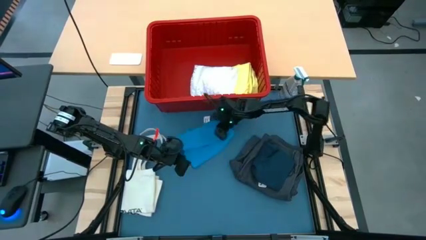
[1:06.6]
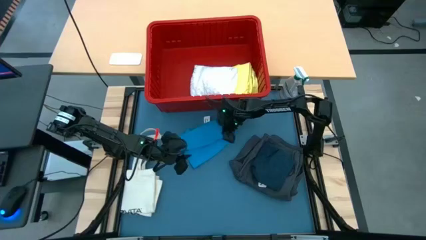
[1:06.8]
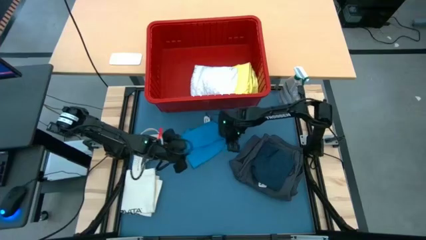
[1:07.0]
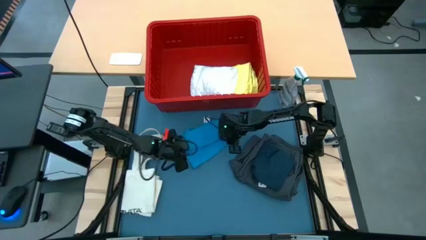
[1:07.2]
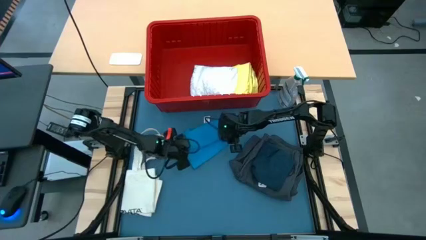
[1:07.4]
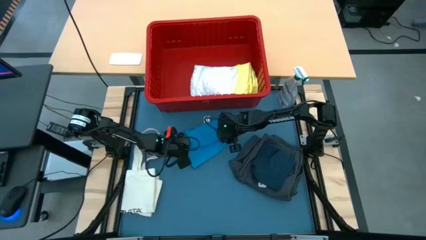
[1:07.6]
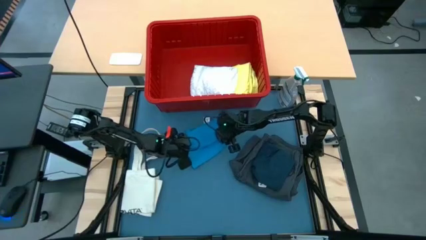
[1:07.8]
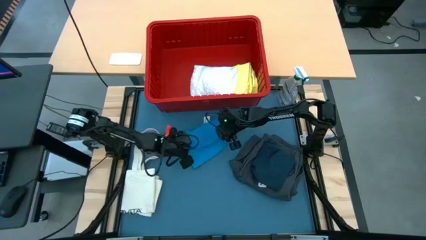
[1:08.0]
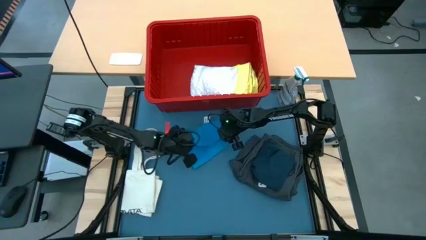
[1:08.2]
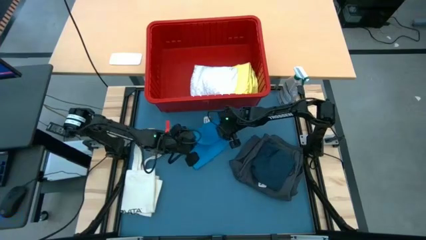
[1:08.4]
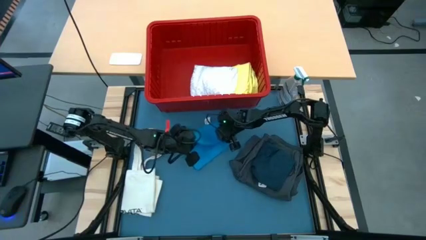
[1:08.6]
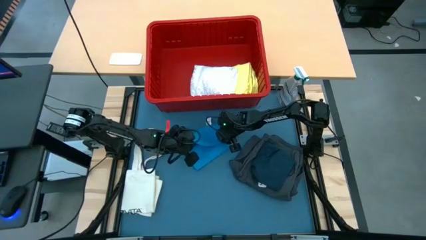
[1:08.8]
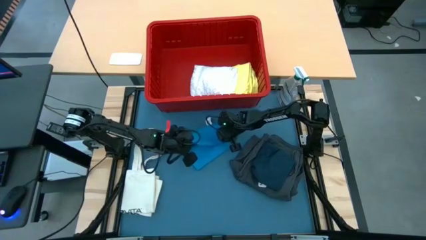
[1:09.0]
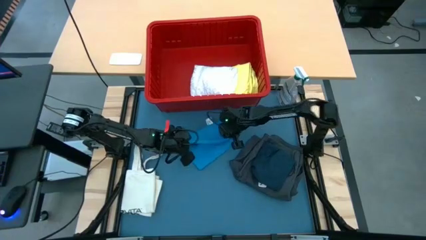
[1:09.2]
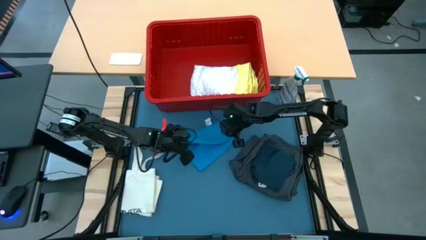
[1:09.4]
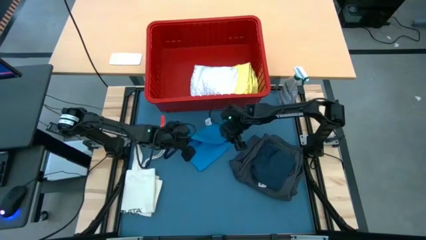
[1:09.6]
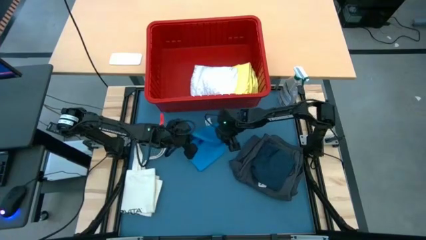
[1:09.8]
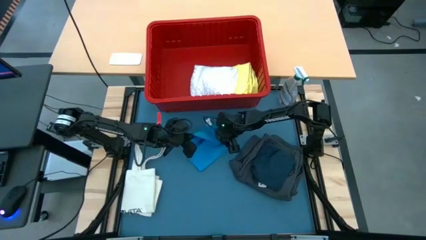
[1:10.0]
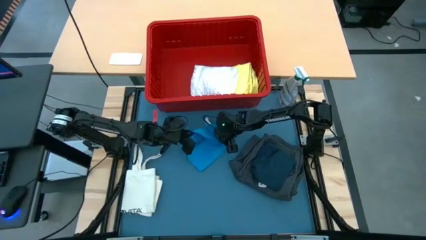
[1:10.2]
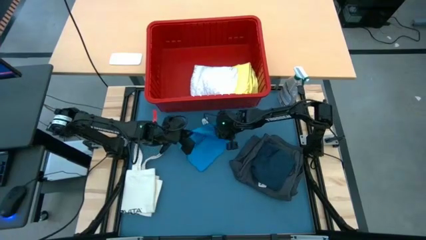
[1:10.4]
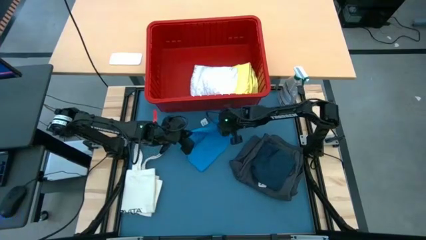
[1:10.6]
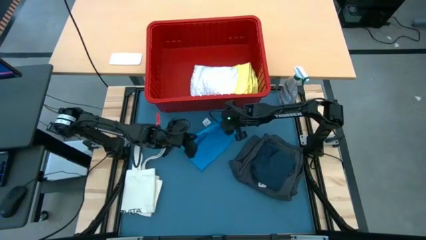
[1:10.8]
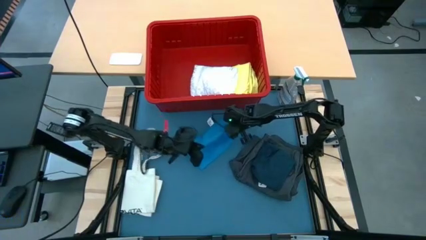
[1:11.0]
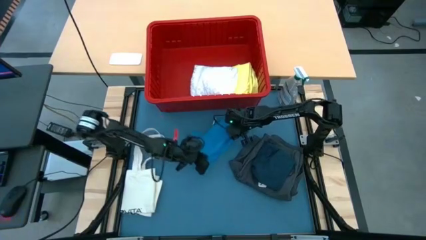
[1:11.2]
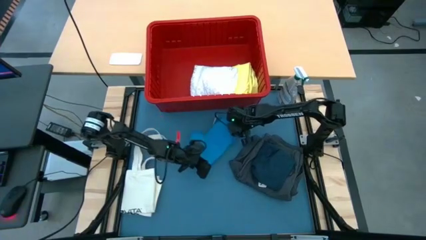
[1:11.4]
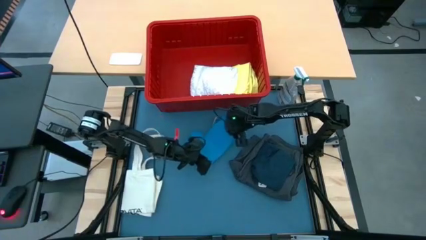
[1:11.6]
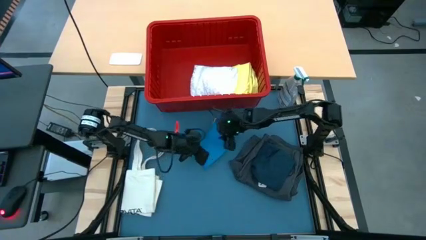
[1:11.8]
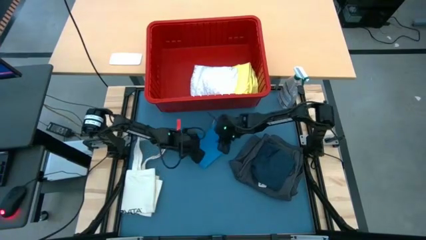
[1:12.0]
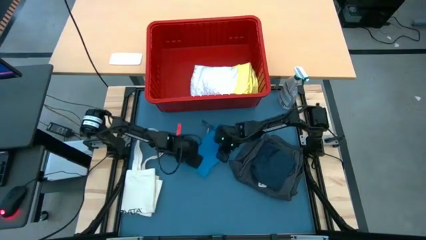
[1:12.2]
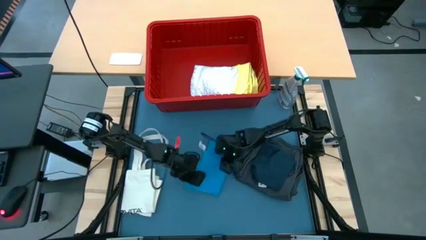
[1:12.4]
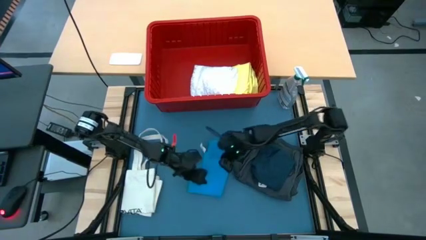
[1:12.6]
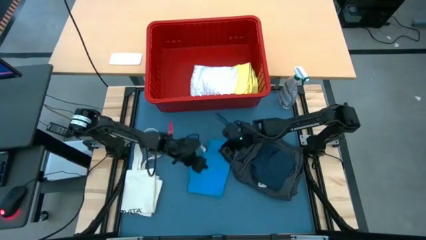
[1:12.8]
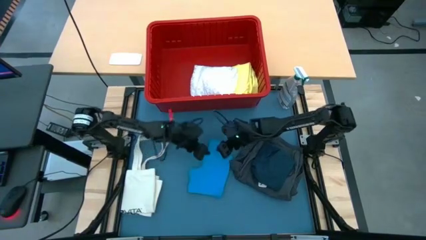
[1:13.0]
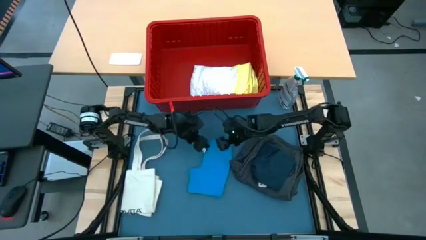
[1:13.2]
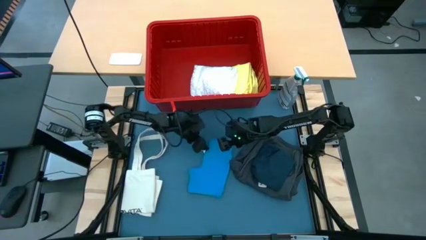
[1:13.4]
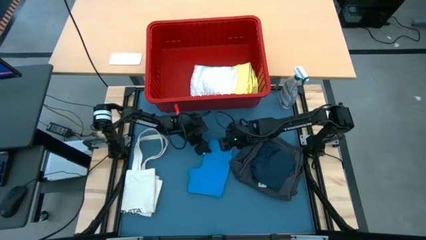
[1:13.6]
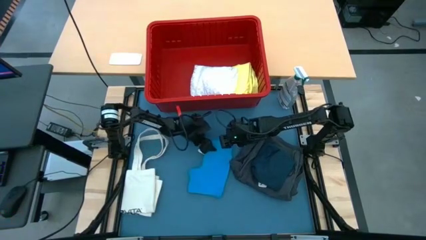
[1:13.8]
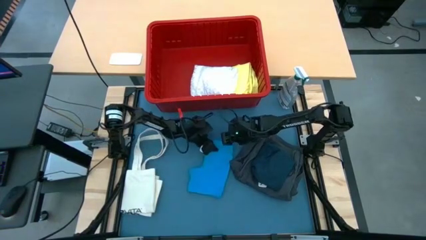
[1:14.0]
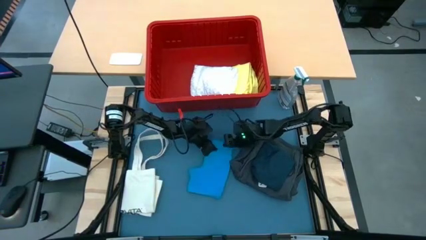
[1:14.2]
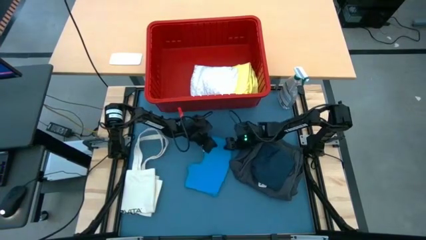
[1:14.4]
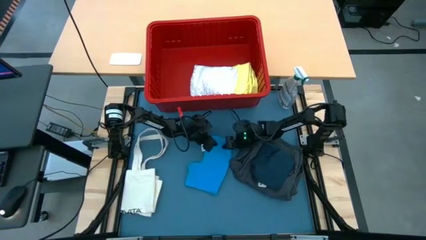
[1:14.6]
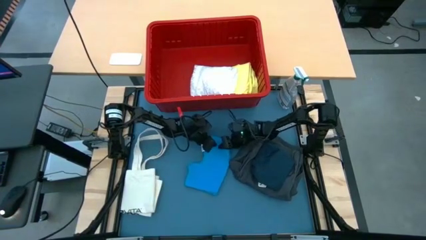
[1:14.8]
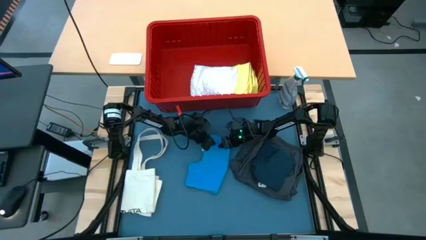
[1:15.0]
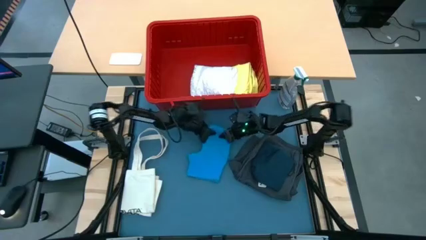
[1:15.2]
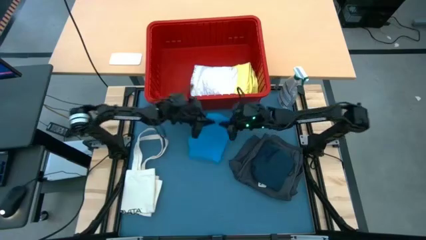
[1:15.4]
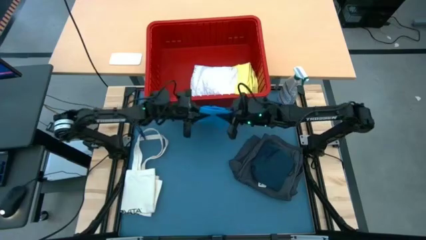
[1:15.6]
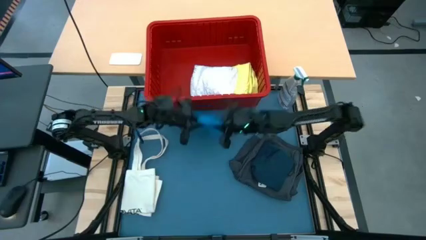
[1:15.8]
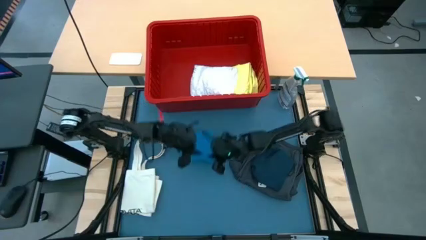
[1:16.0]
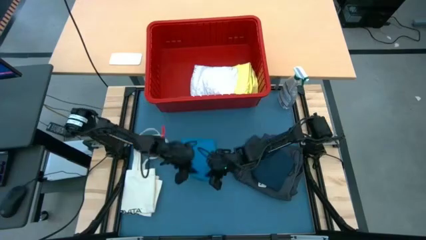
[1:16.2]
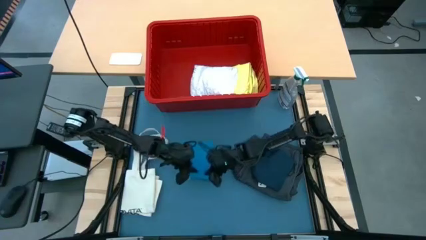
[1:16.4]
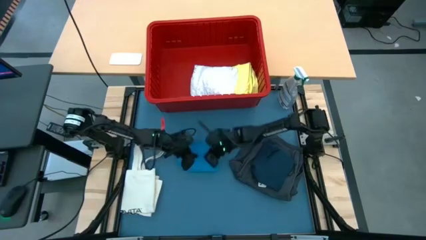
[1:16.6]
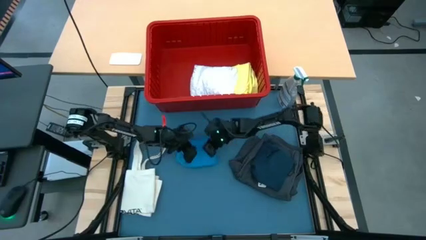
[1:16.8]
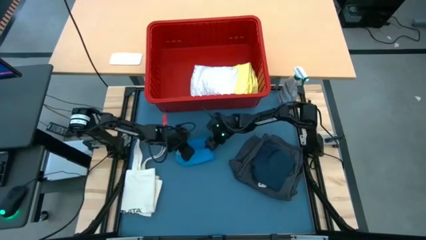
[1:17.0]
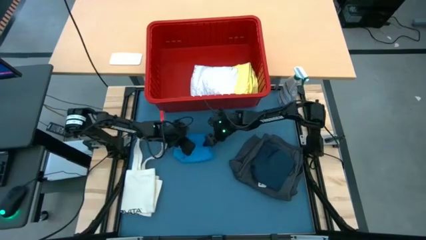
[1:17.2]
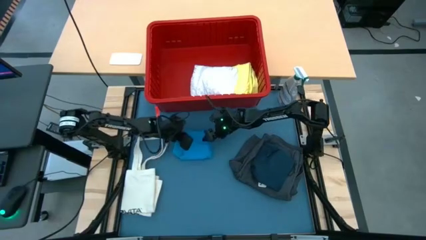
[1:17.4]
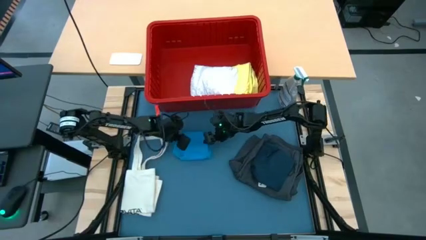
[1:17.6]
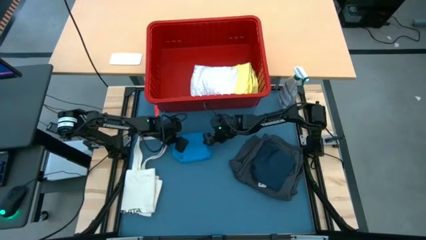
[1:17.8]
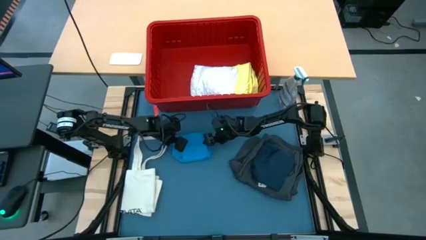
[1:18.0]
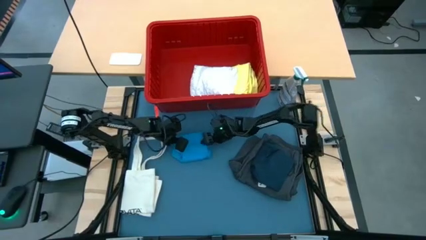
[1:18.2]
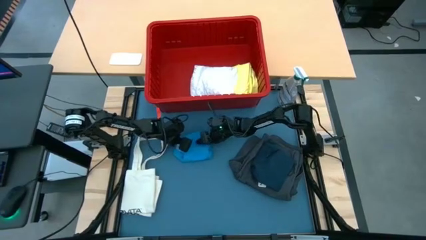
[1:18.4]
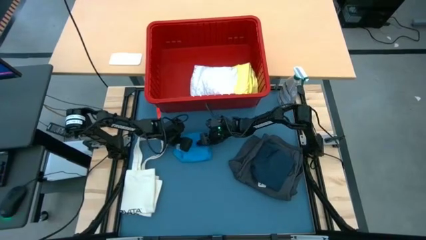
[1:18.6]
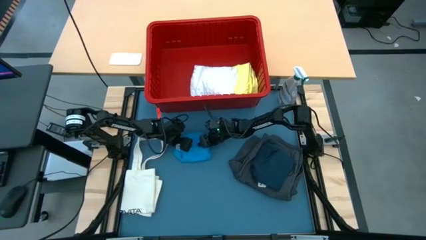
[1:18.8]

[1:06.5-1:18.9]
Task: Fold Laundry from Bin
Fold the blue shorts

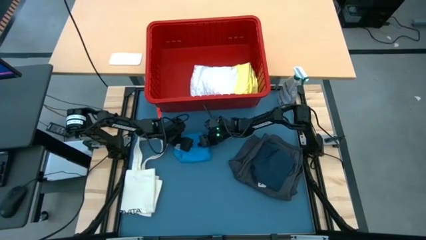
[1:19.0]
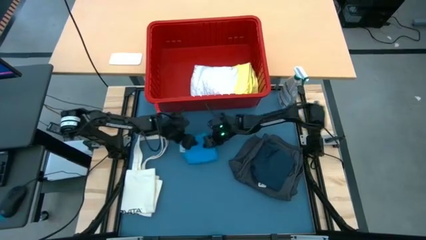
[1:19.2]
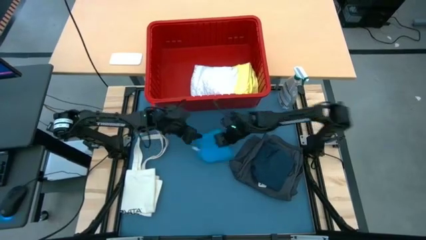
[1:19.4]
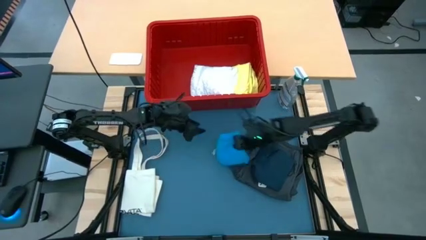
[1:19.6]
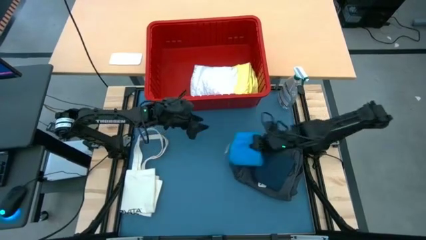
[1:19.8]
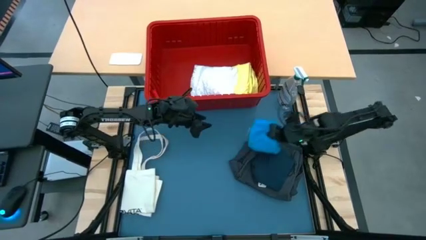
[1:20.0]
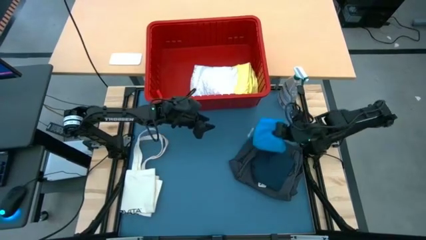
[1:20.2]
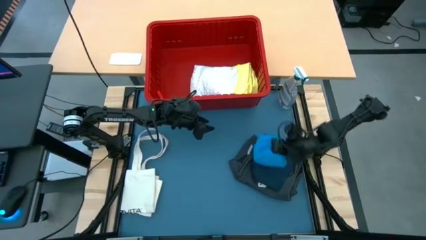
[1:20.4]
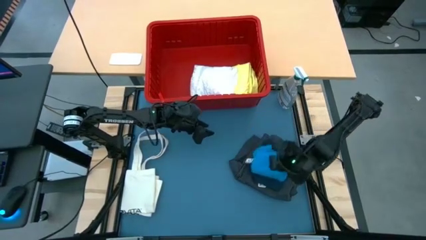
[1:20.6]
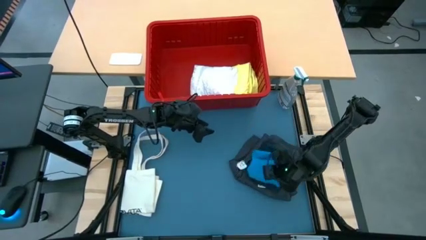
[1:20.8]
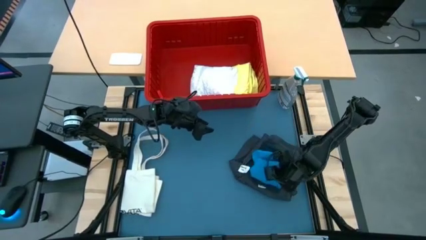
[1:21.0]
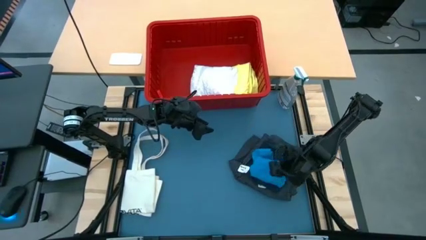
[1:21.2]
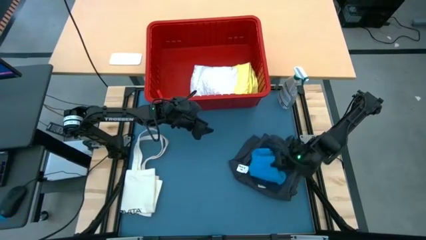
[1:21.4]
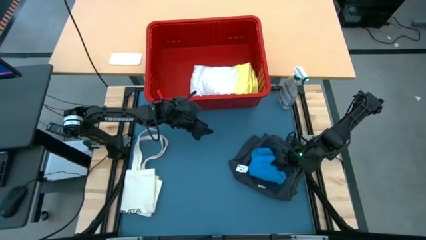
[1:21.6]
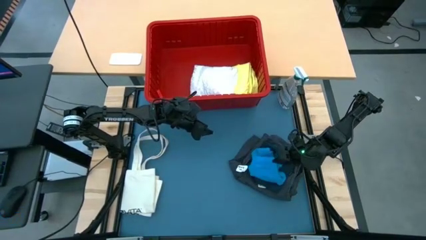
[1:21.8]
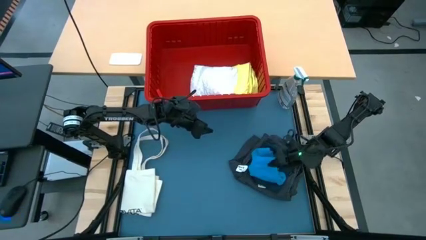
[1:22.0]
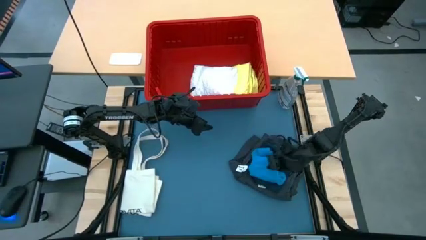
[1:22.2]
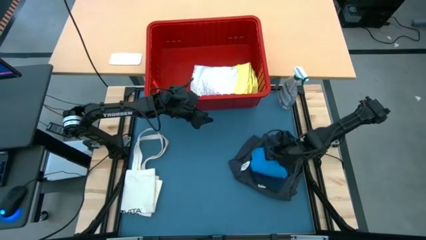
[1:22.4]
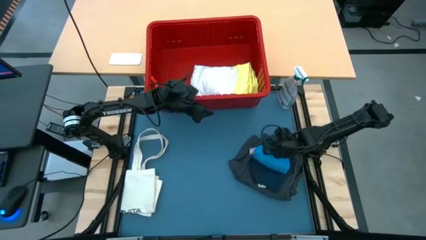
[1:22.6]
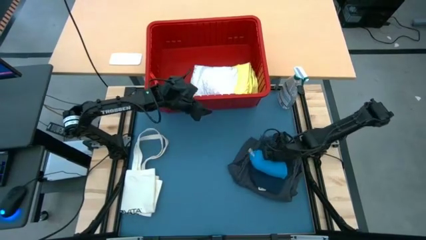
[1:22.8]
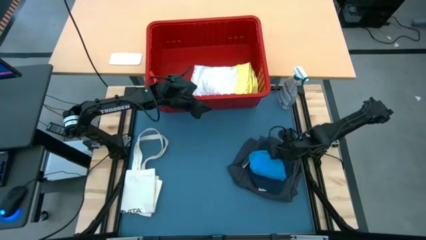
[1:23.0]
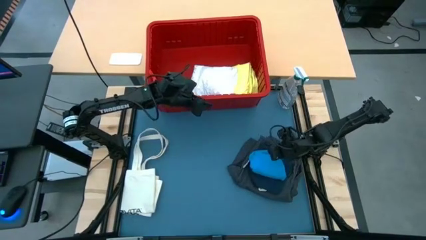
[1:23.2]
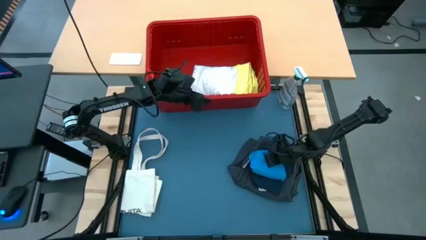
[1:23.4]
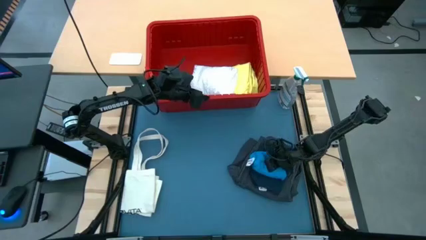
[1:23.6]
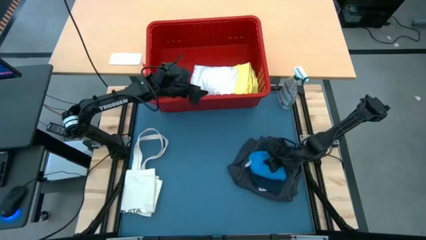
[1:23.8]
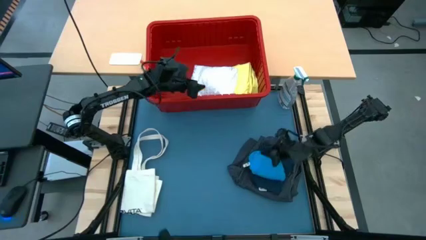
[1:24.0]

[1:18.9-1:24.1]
Stack the folded blue shorts on the folded dark blue shorts
